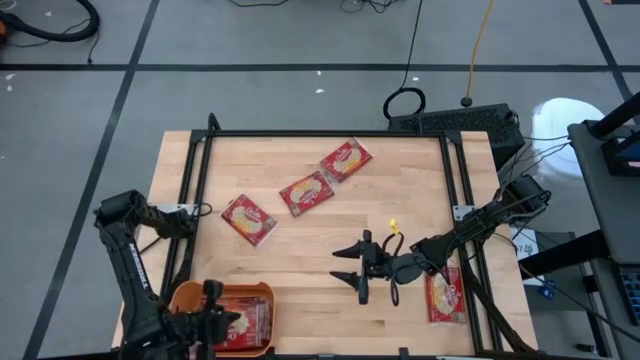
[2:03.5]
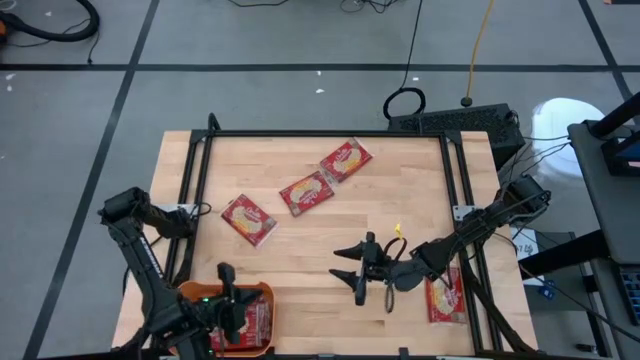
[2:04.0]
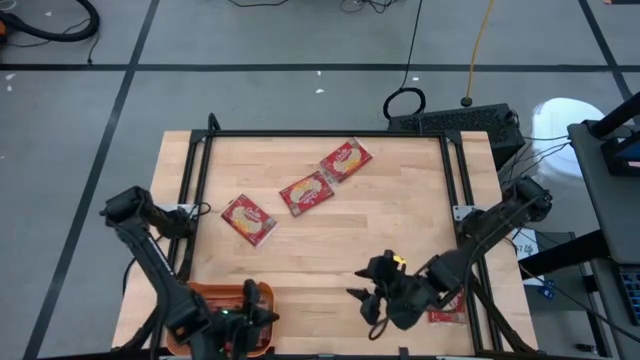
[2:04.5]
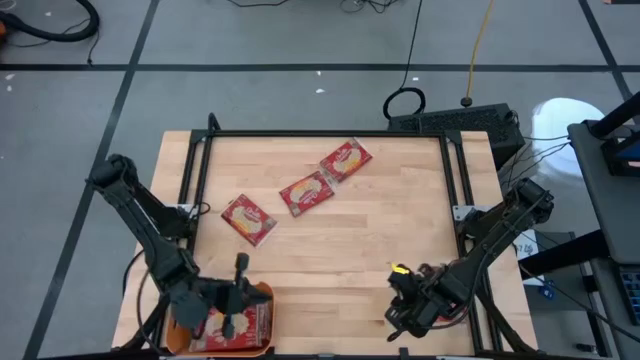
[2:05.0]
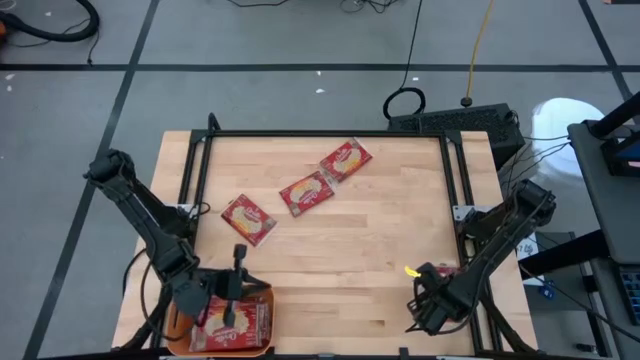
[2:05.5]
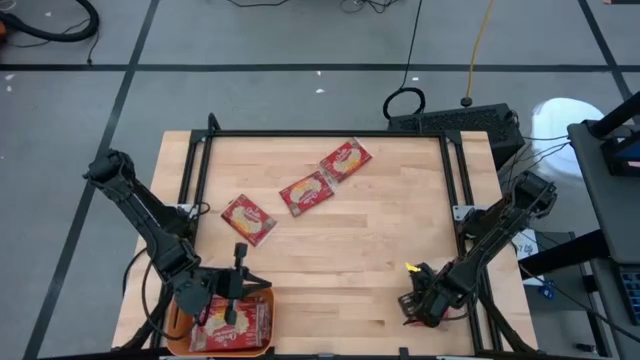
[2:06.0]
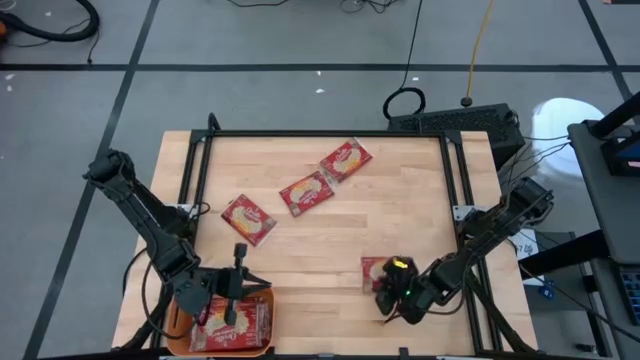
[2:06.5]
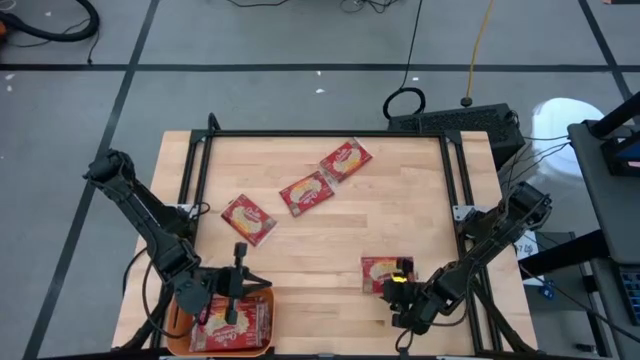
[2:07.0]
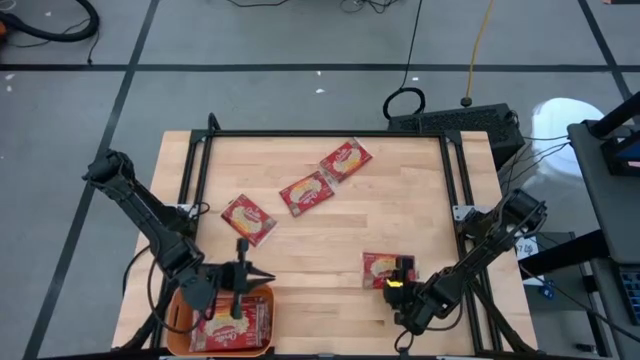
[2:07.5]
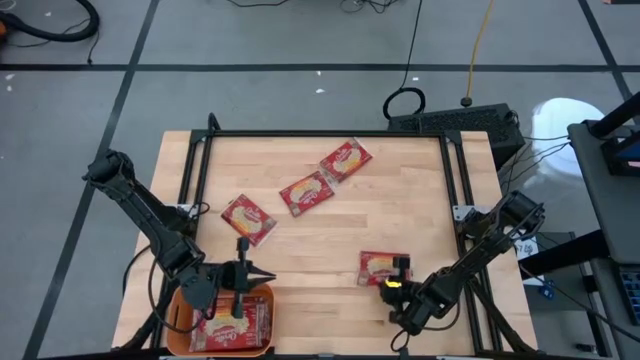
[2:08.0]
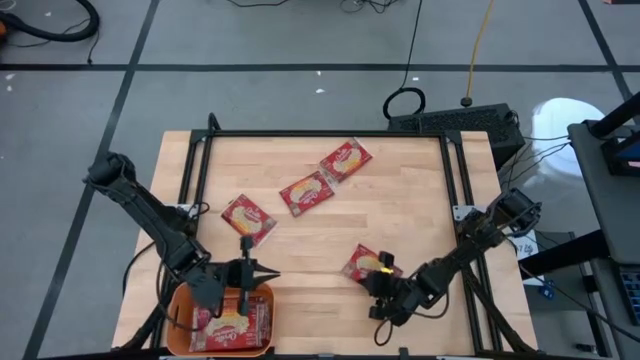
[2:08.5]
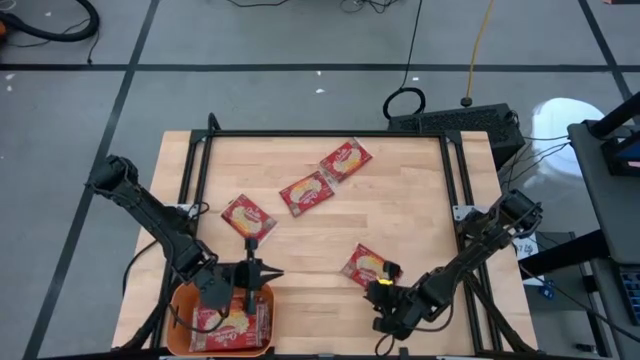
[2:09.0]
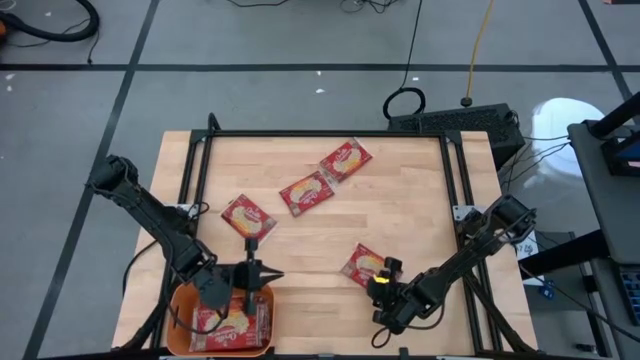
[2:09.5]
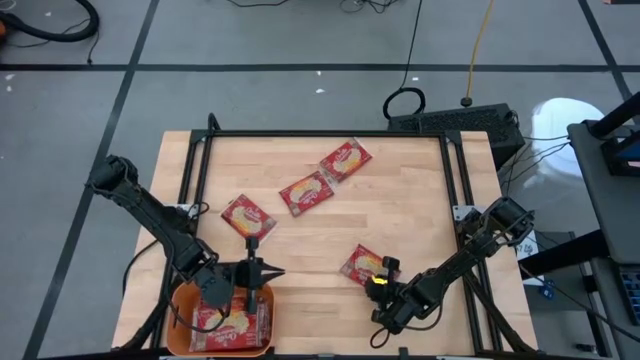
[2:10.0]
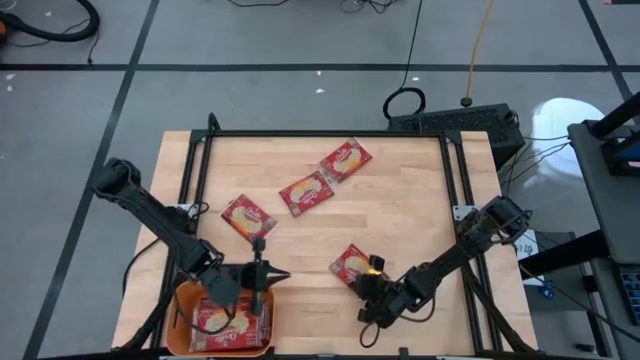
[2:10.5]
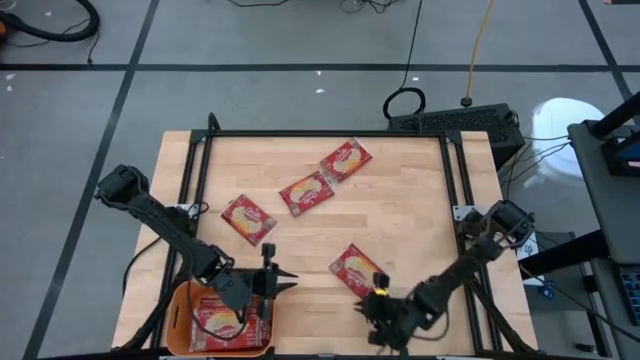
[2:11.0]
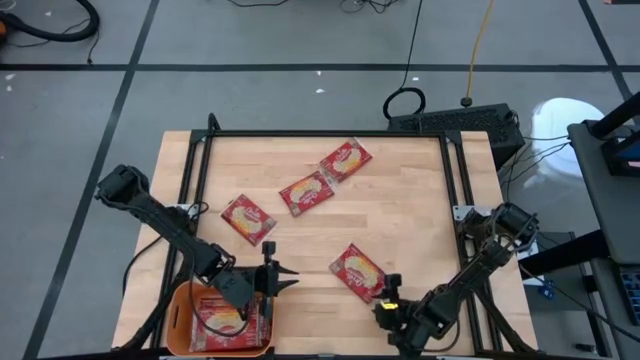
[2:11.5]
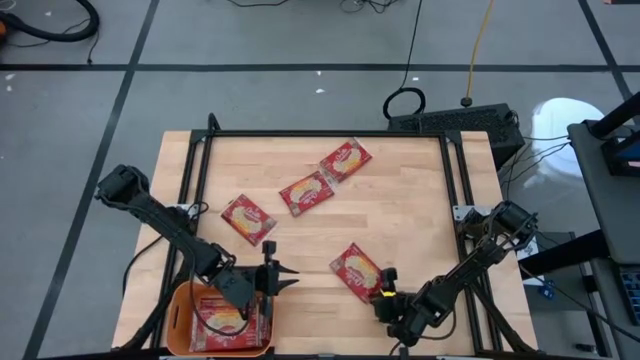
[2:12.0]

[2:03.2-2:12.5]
Task: Sort popcorn bags into baskets
Put the popcorn bag into the orange bin

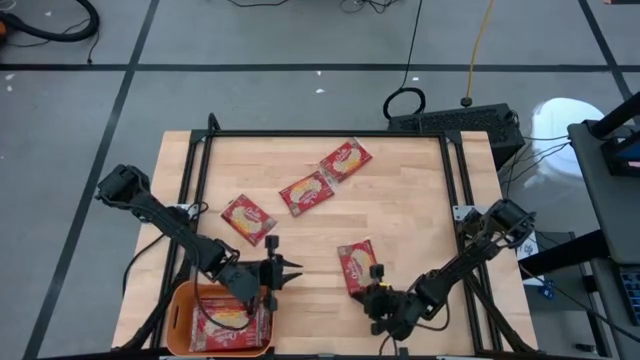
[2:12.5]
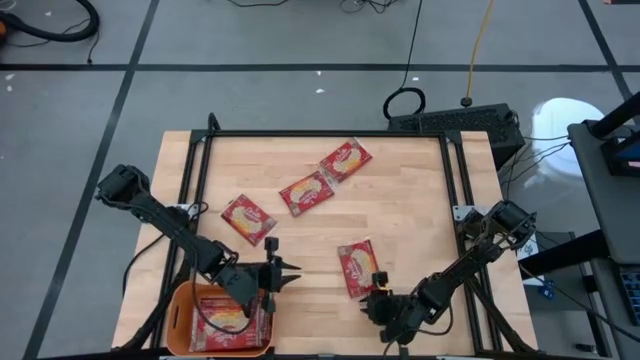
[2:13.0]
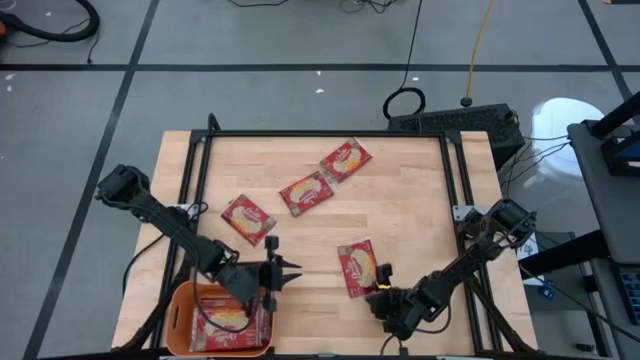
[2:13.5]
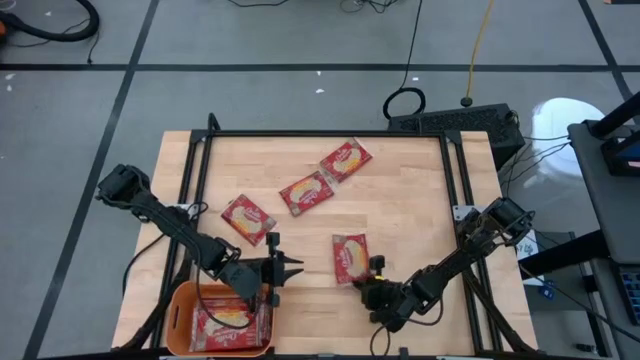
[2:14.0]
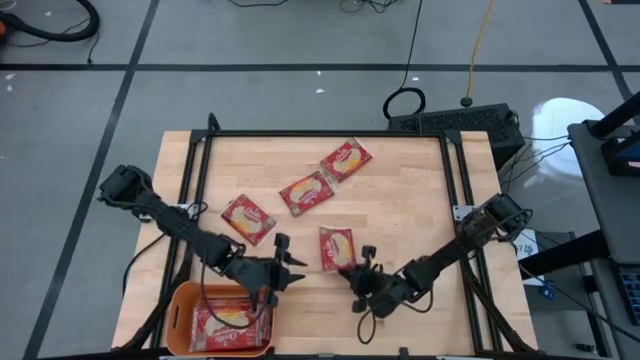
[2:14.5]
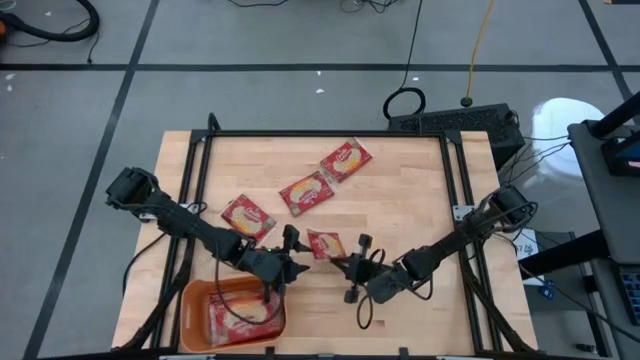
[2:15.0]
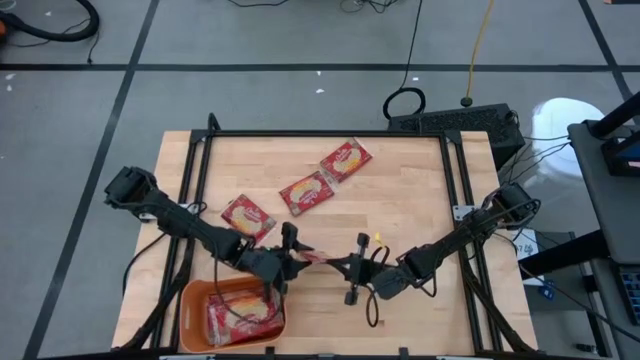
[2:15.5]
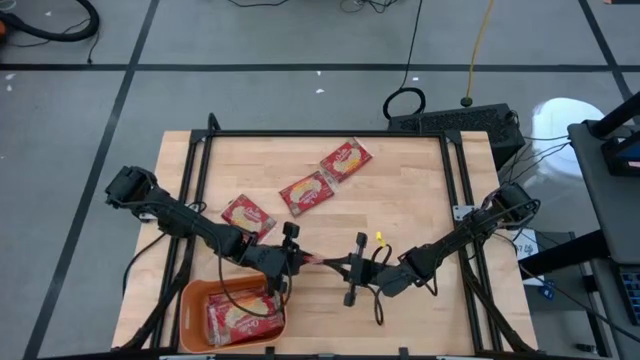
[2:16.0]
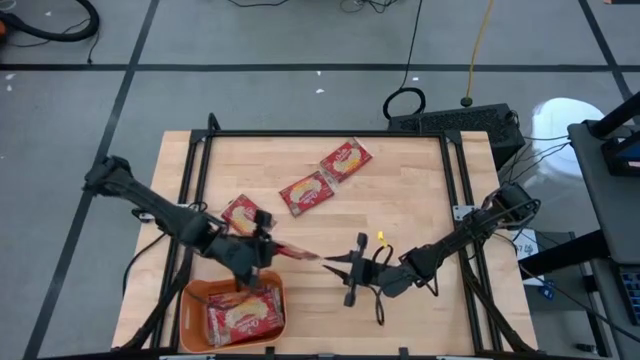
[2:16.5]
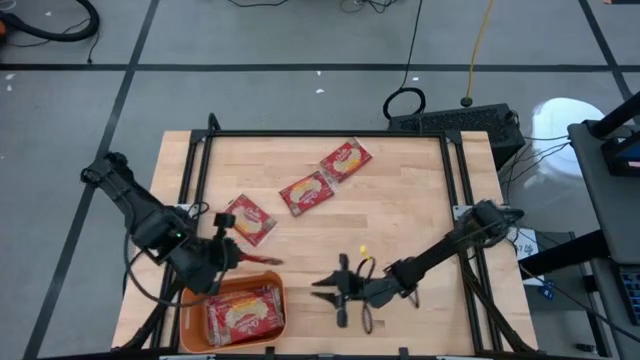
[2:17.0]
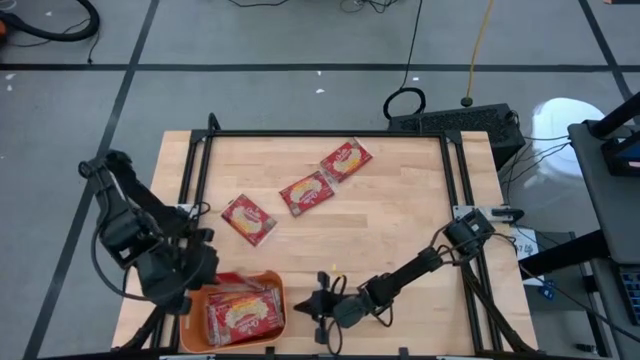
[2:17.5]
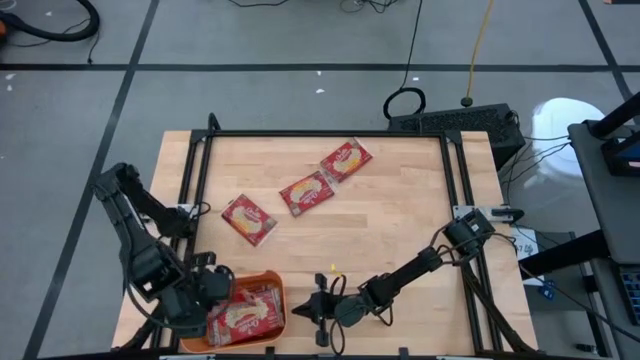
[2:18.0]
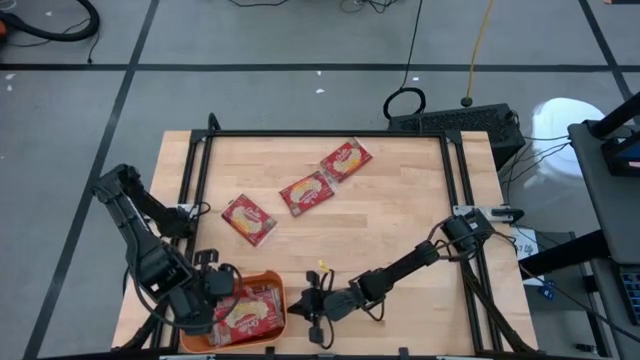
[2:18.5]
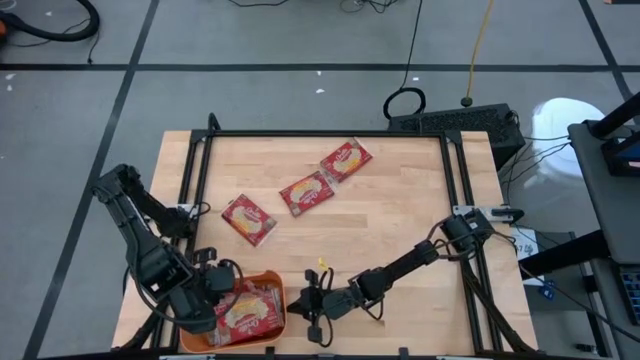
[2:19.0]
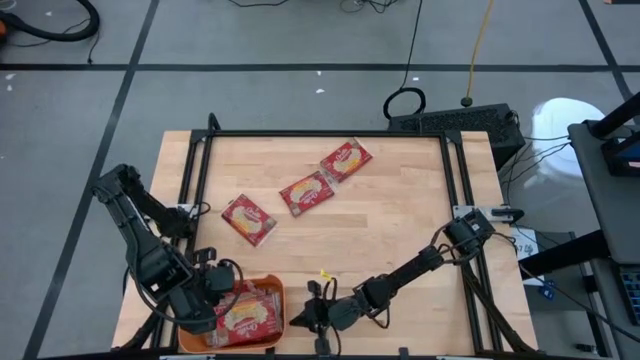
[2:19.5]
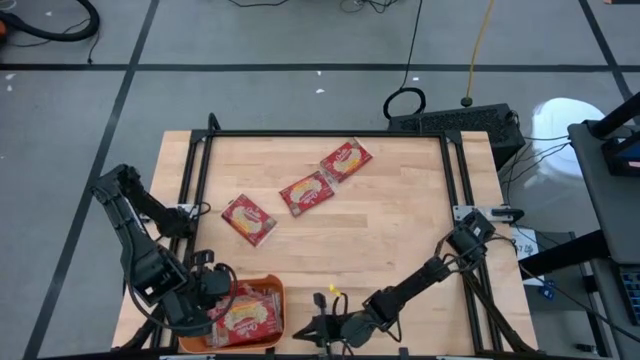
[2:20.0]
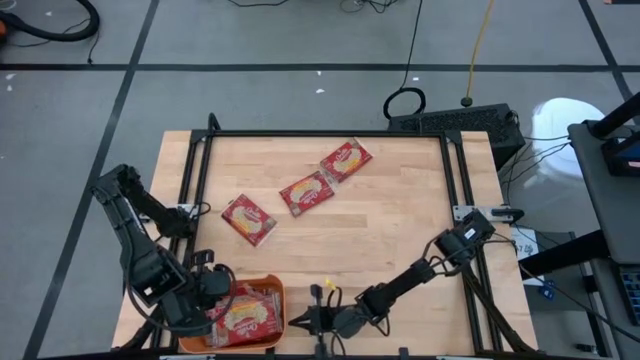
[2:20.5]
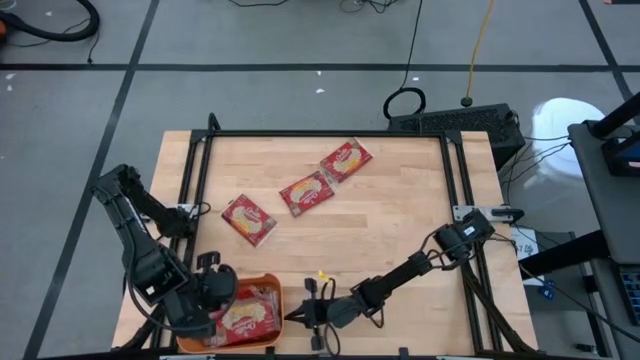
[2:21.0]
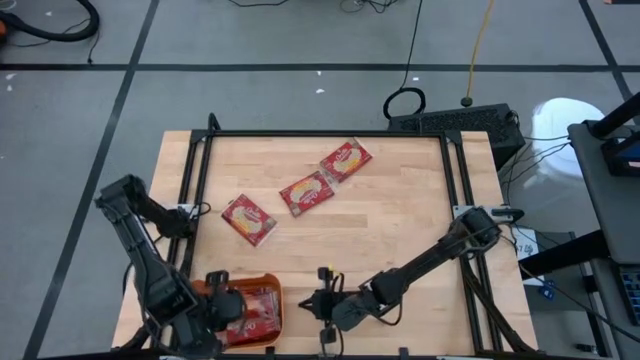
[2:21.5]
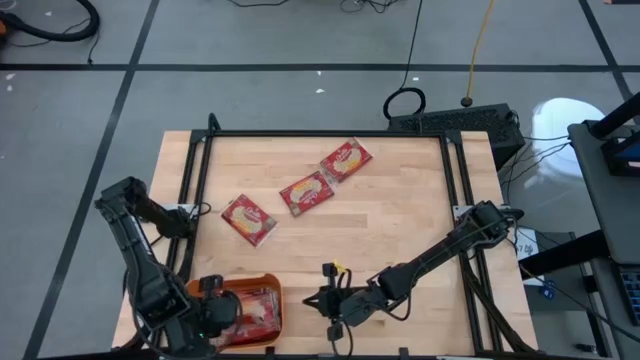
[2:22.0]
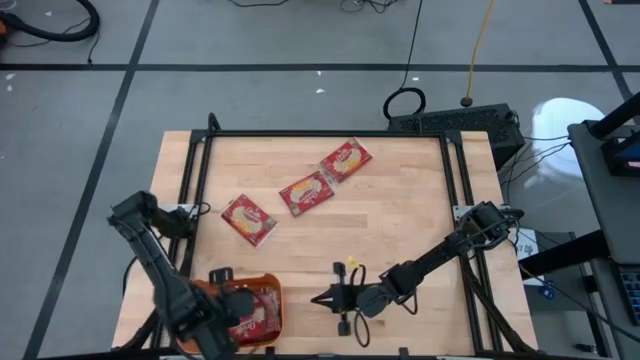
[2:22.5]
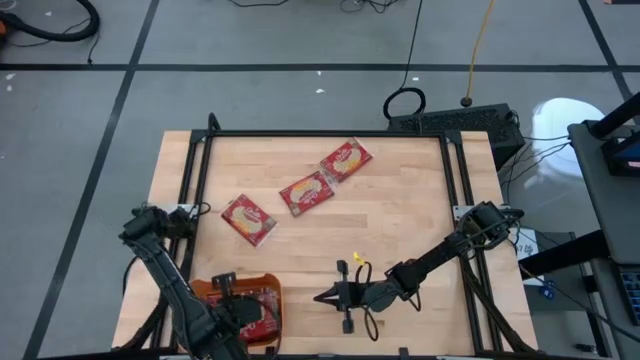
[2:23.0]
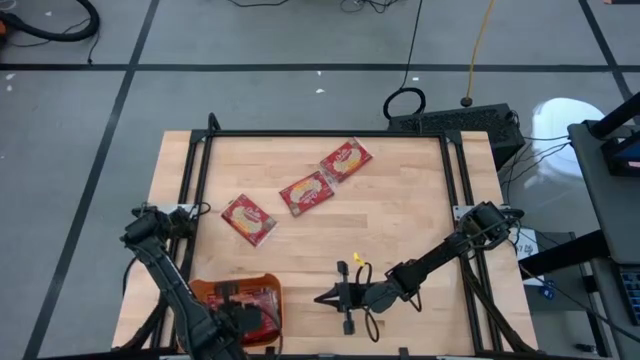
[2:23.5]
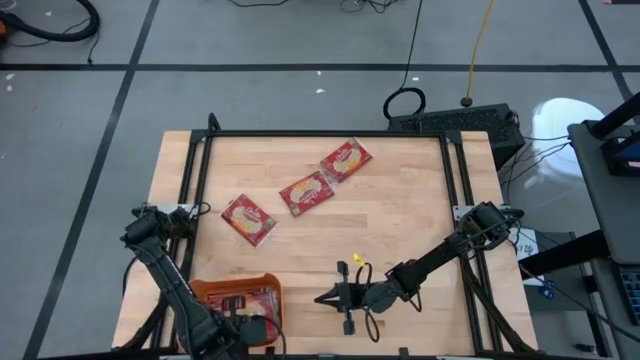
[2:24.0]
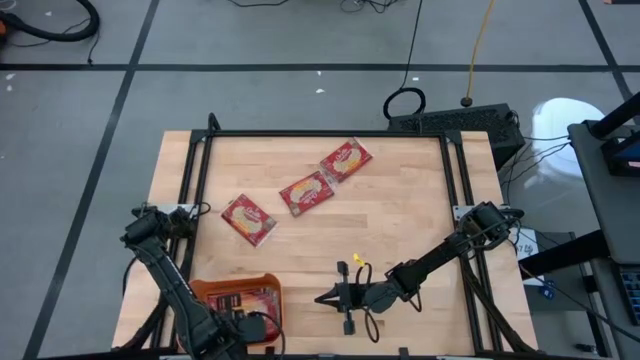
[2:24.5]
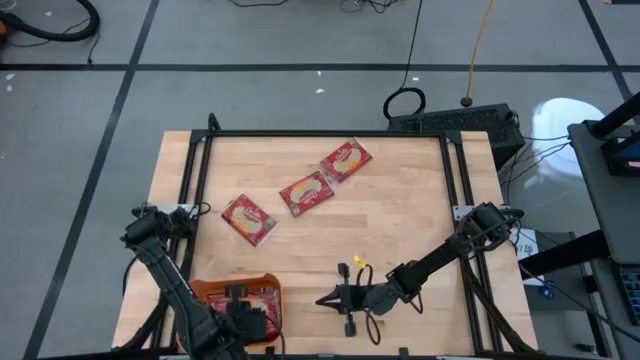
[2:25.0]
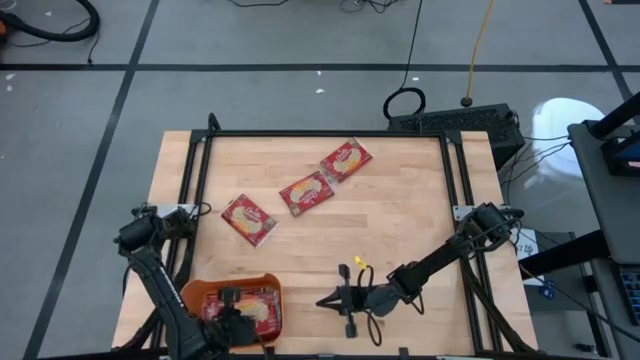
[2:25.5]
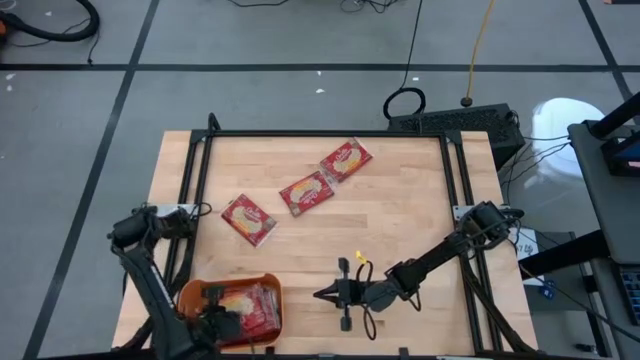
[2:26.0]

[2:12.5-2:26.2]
Put the popcorn bag into the orange bin
